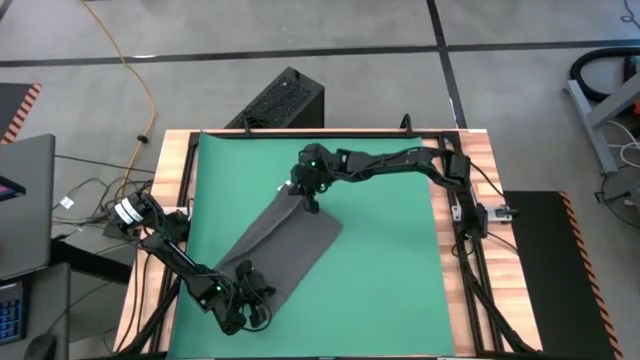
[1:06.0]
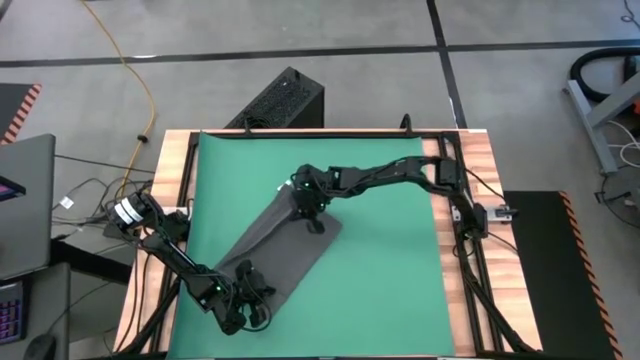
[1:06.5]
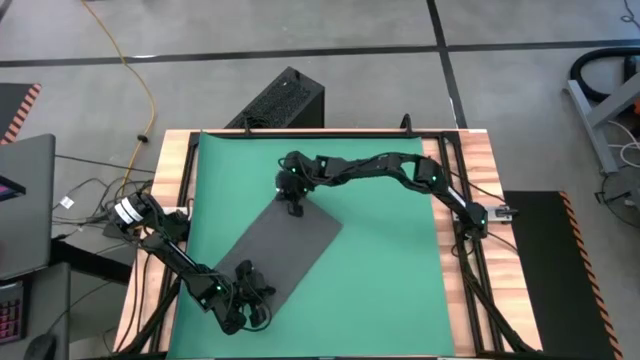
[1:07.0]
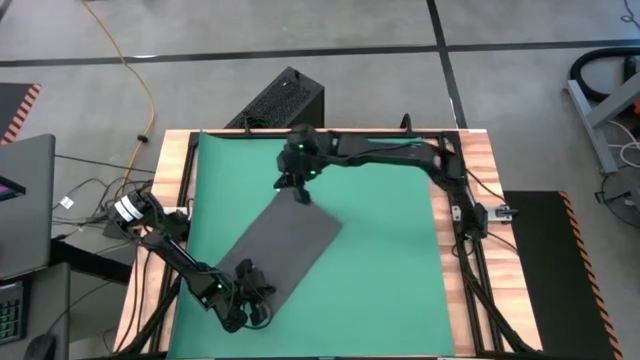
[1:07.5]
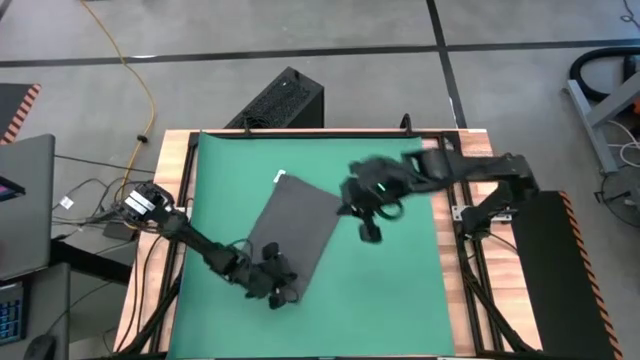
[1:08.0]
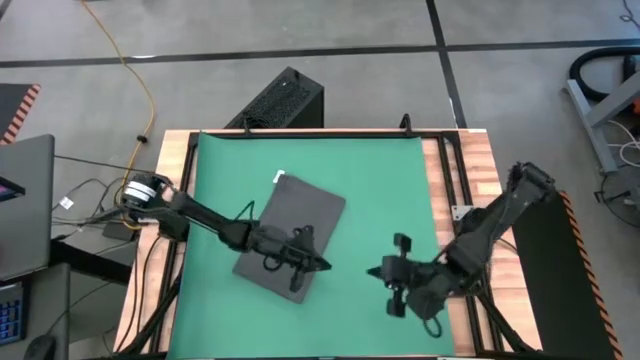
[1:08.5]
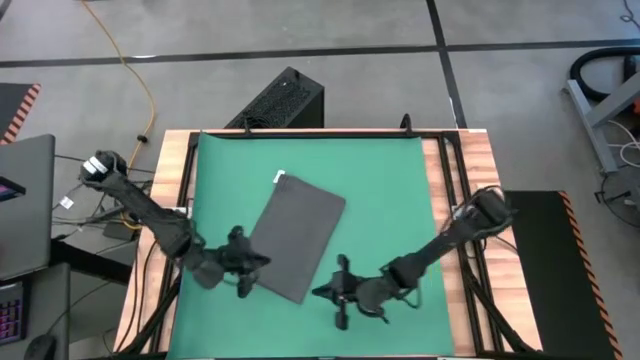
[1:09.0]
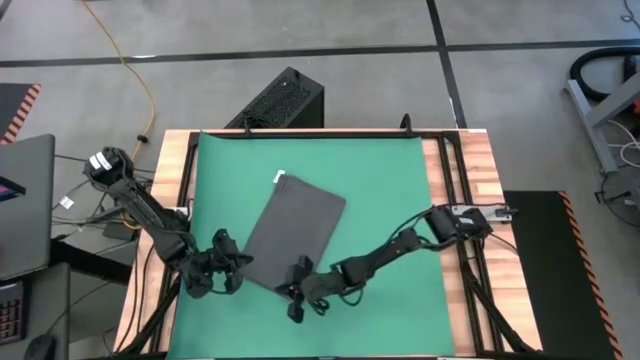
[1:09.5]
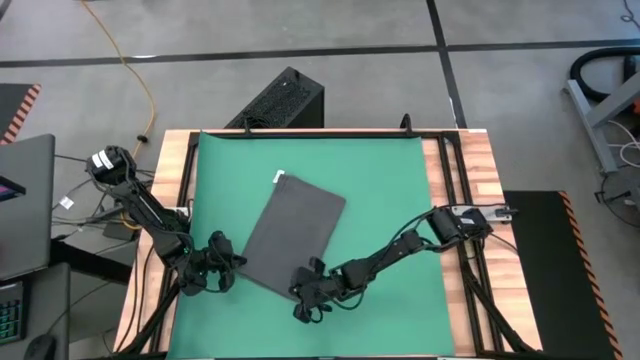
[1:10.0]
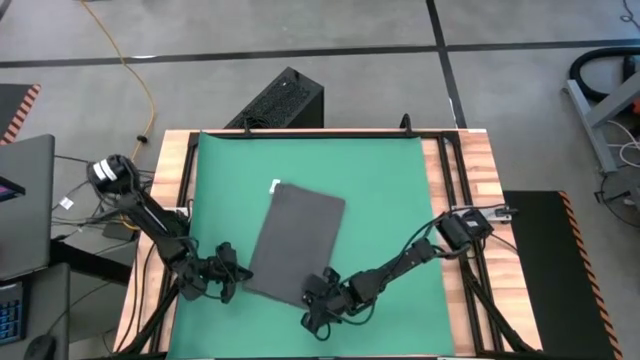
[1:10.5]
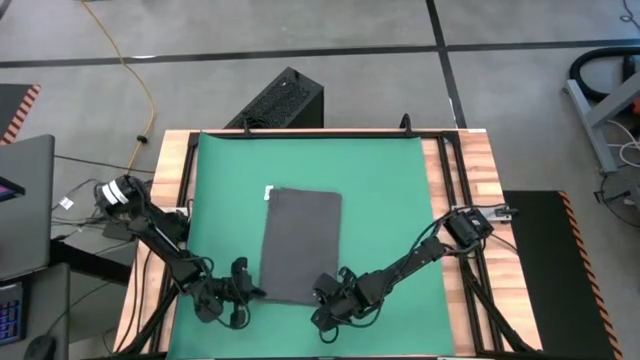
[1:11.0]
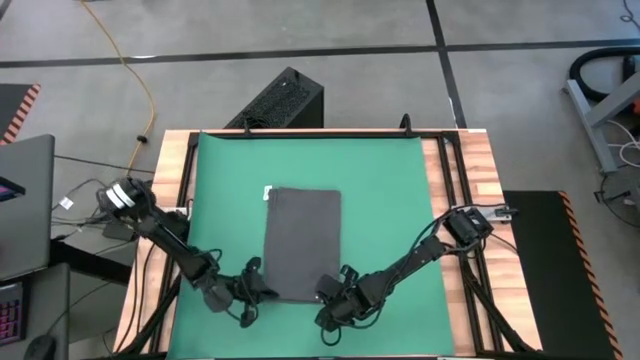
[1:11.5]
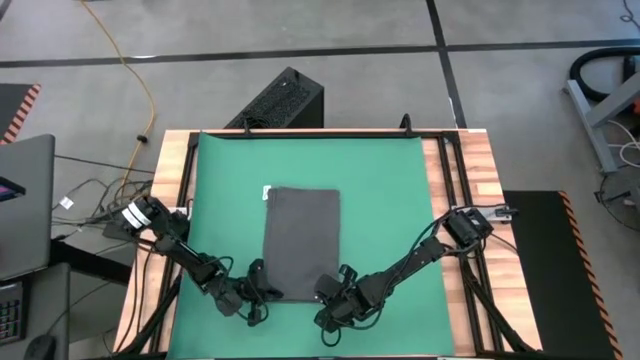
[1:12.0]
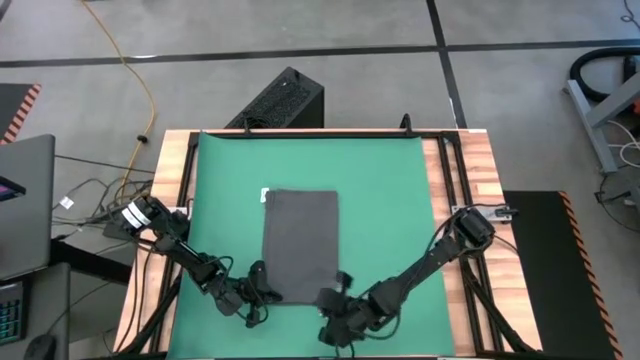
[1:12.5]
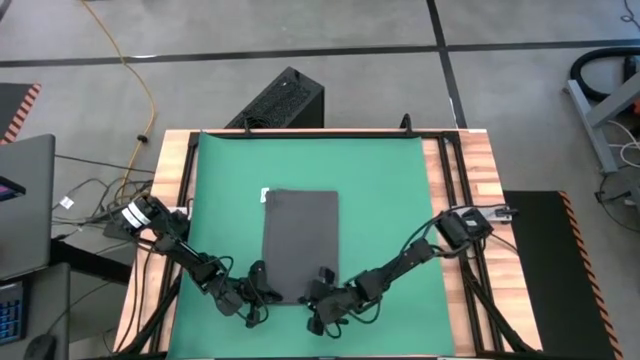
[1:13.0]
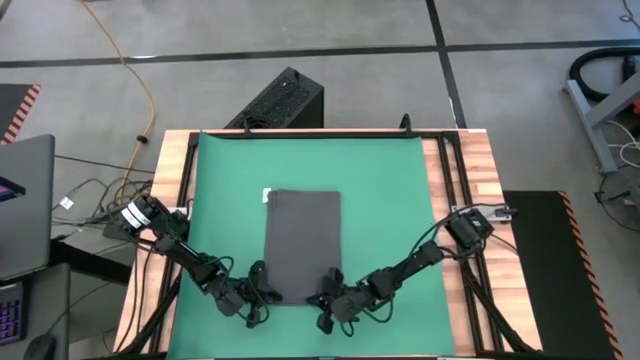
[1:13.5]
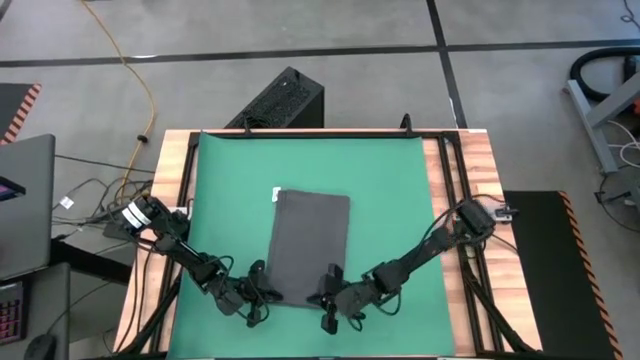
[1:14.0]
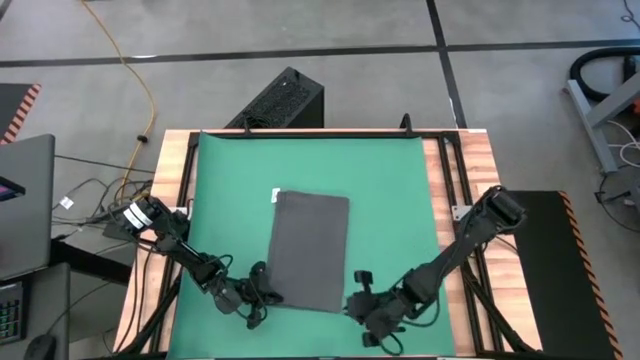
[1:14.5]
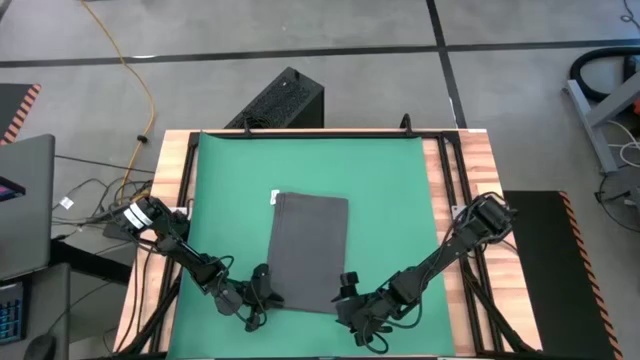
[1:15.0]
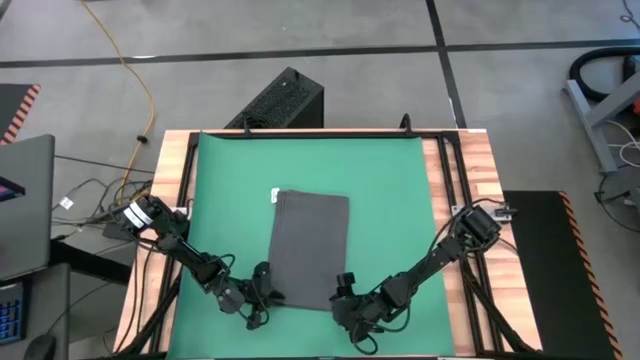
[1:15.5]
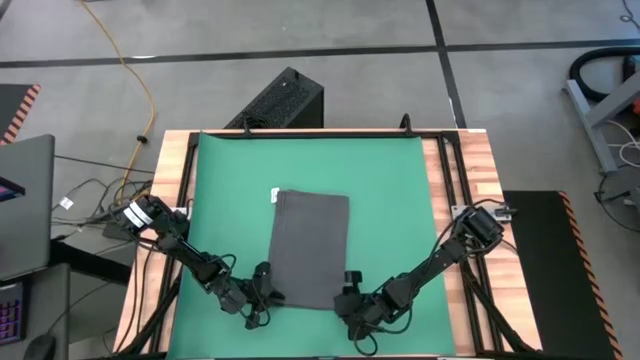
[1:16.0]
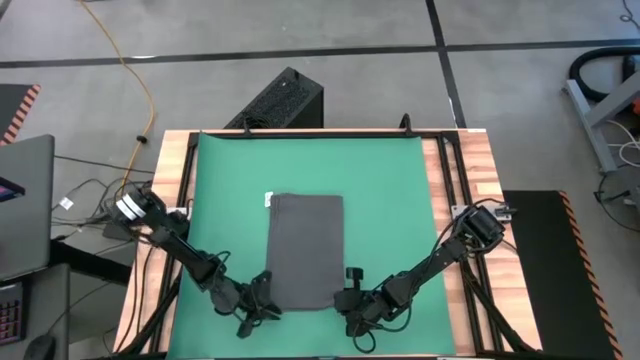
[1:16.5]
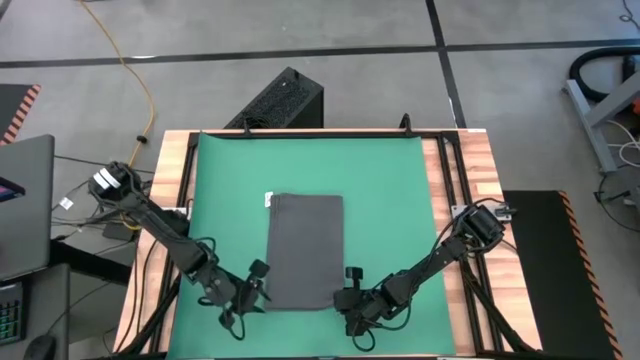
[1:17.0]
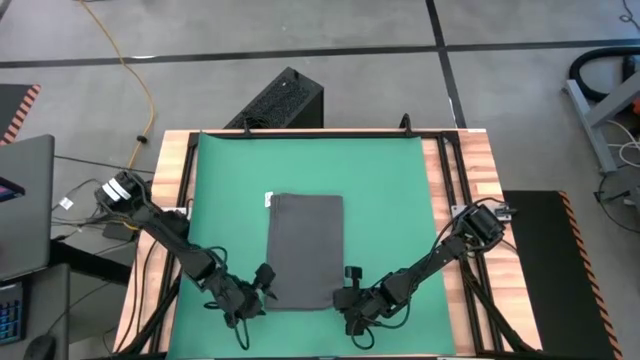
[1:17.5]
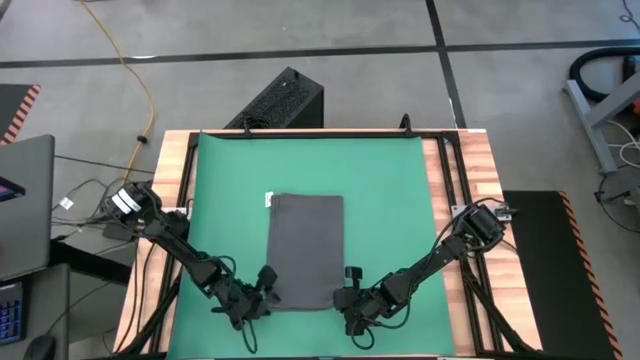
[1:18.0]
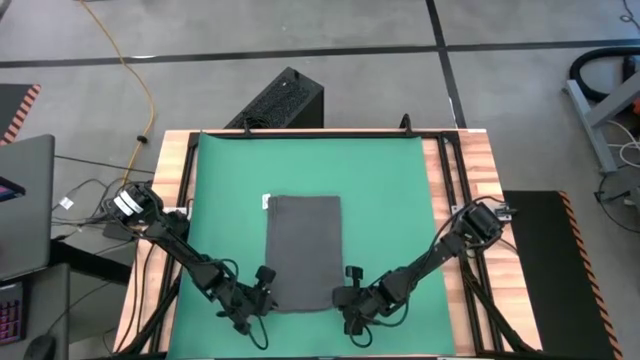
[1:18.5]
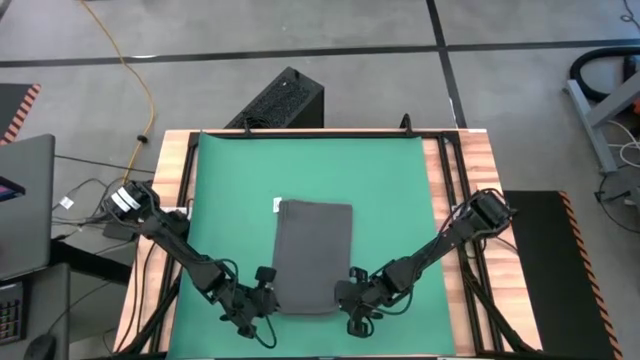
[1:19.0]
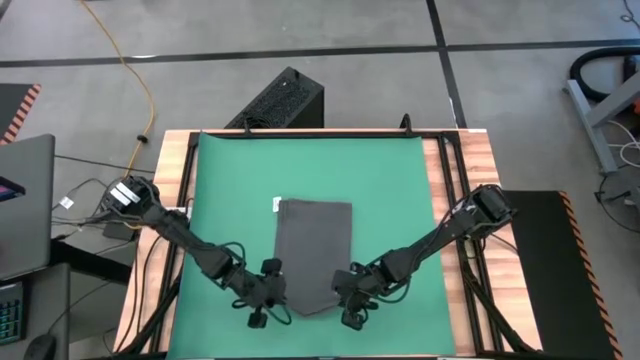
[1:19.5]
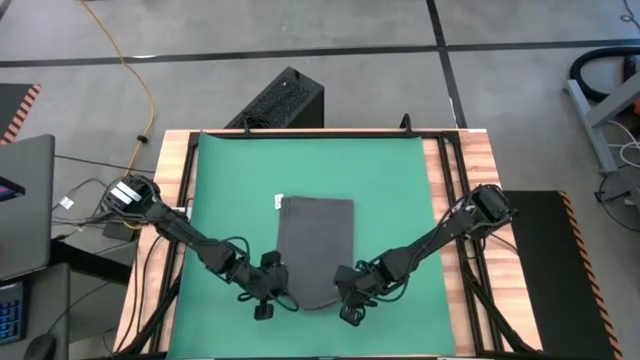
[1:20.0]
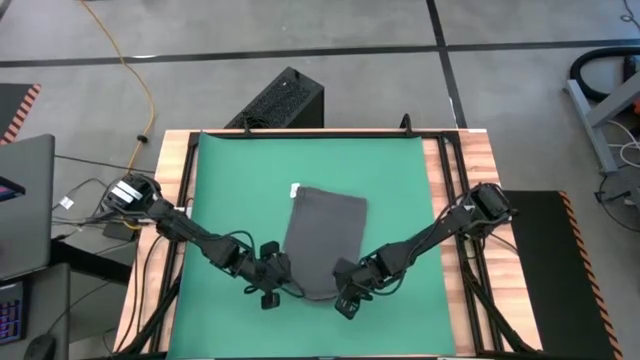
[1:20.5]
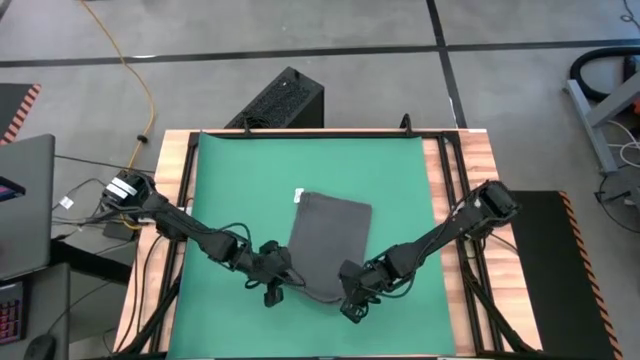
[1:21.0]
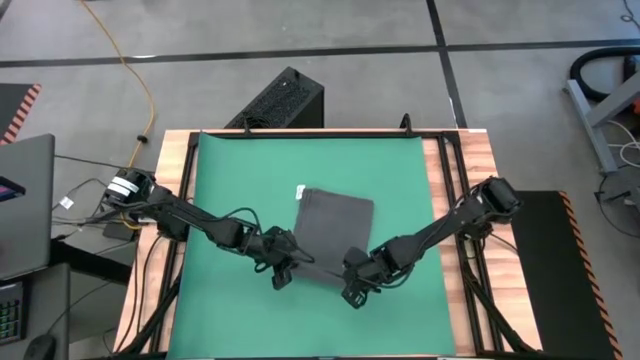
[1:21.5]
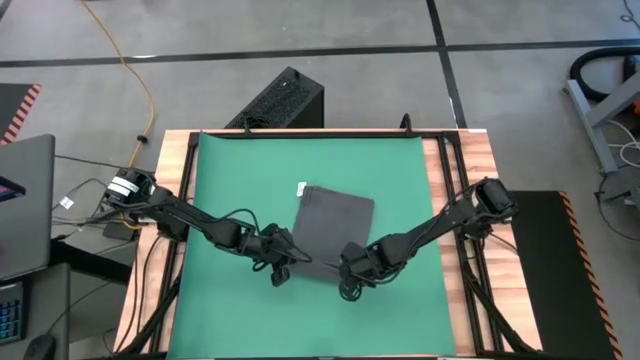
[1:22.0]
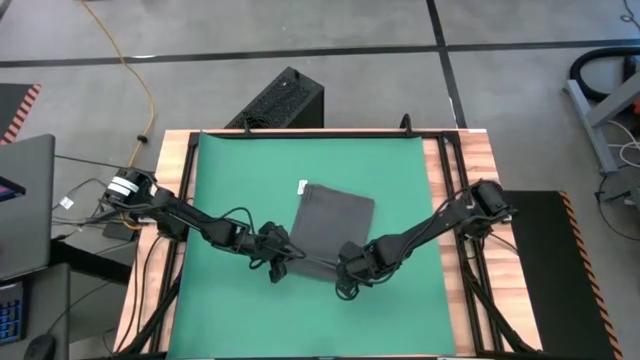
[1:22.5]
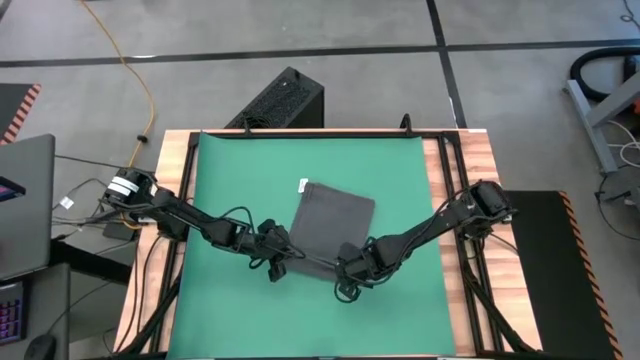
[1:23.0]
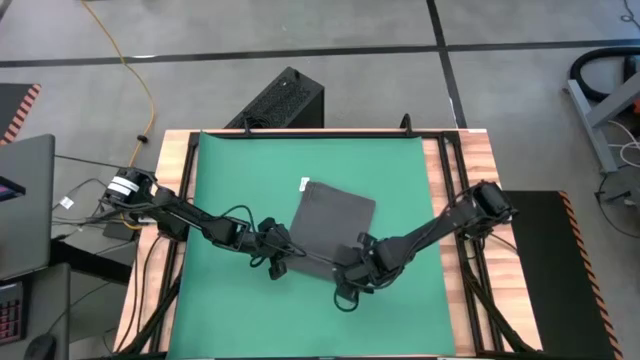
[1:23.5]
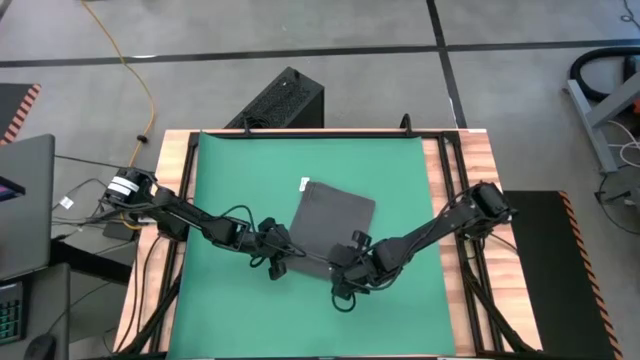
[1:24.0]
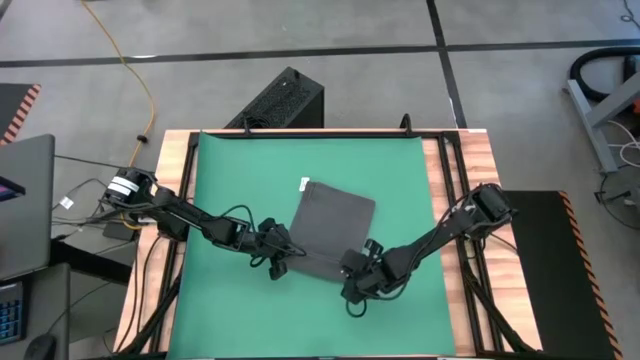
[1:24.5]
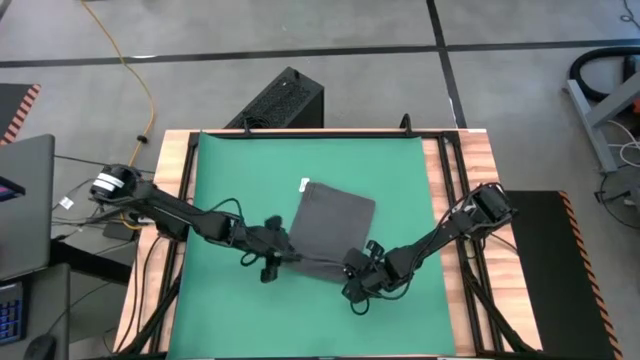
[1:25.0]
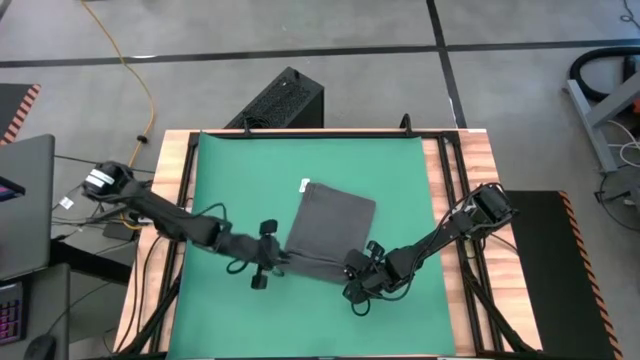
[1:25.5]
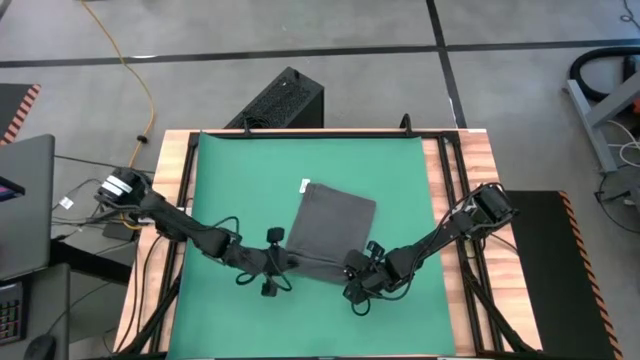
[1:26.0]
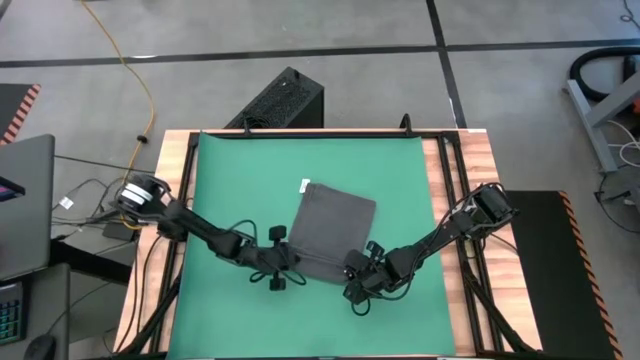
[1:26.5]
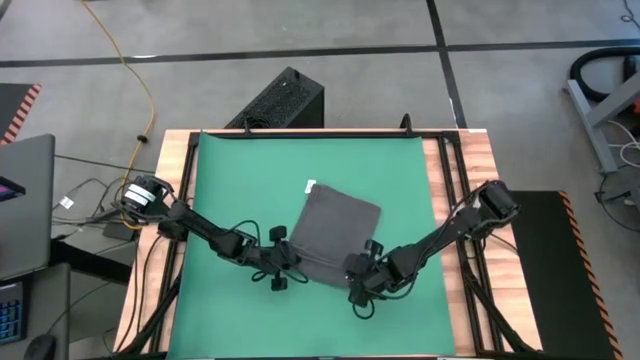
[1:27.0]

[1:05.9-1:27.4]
Task: Roll towel into tight, uniform cylinder
Roll the gray towel

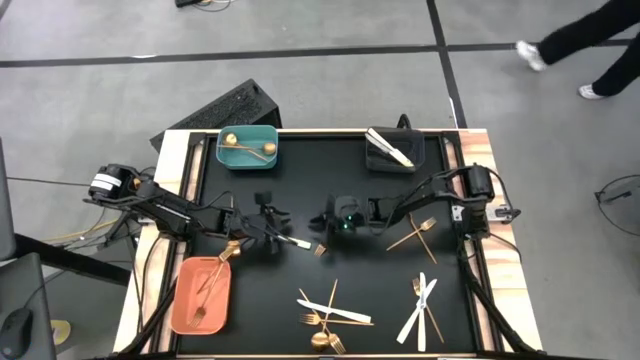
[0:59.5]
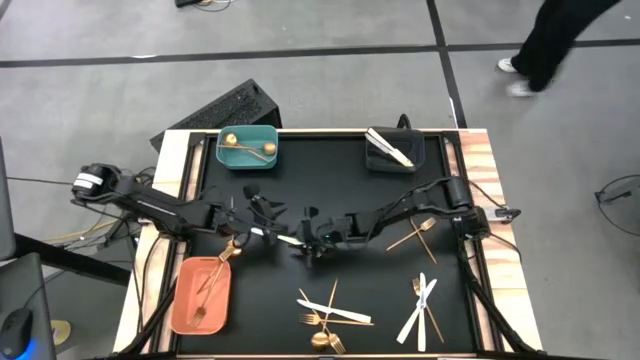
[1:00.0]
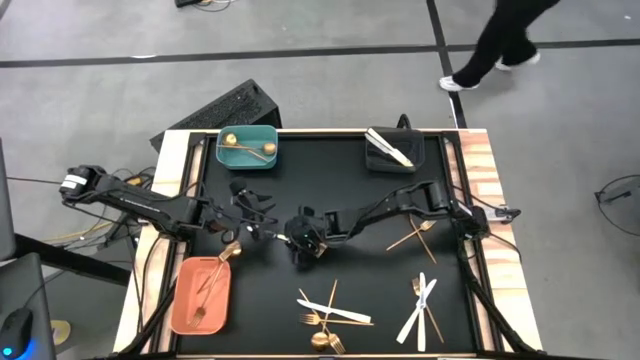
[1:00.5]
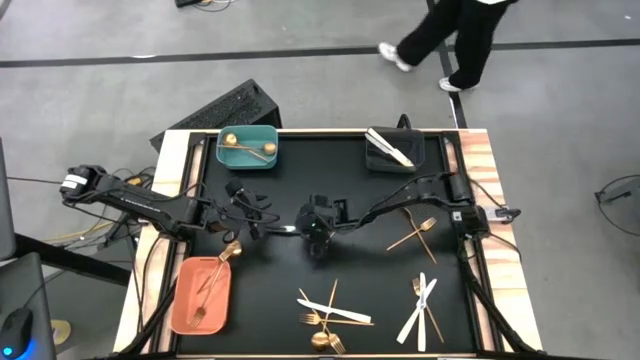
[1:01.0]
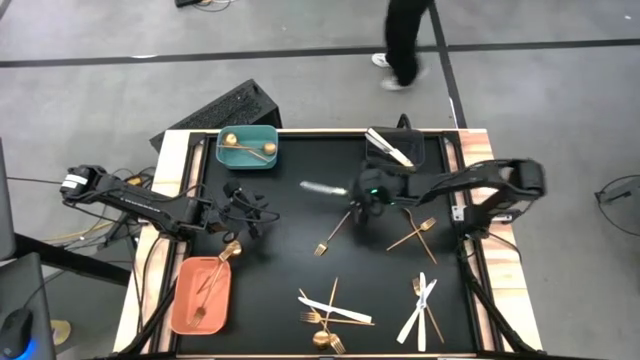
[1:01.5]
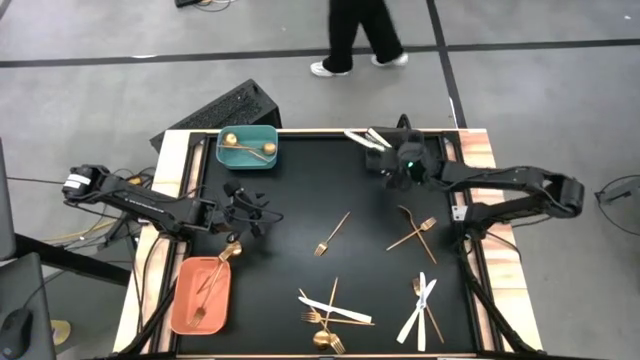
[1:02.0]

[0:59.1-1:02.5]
Task: Sort silverware by color (type)
Put the white knife into the black bin
